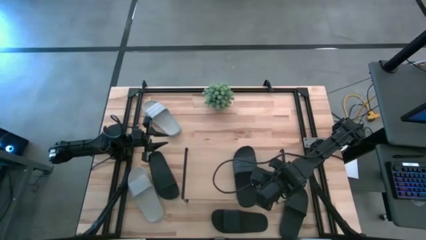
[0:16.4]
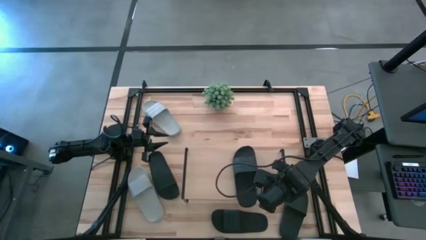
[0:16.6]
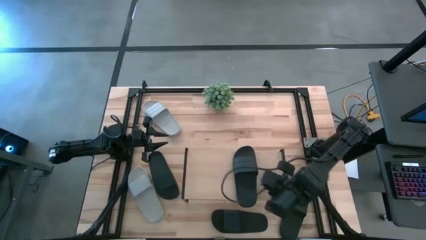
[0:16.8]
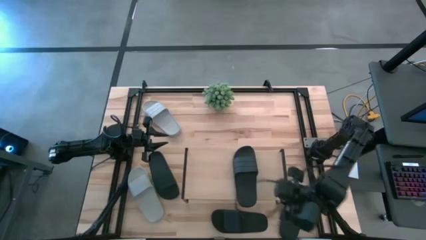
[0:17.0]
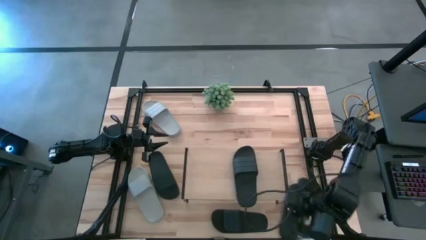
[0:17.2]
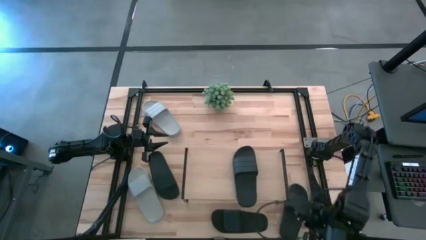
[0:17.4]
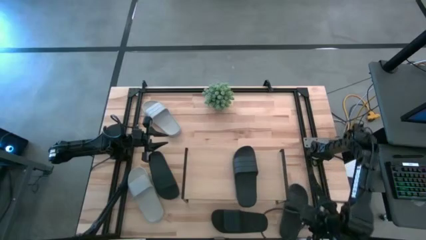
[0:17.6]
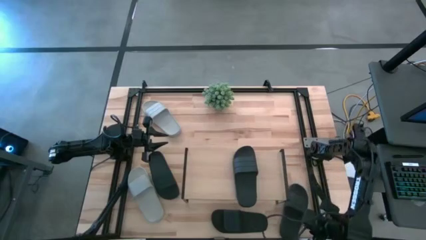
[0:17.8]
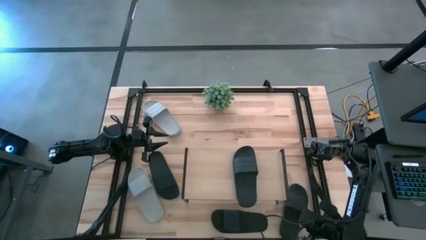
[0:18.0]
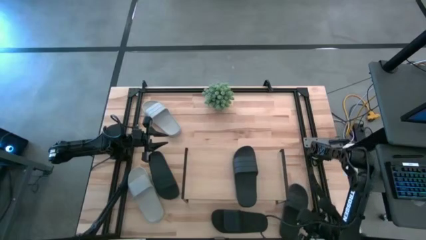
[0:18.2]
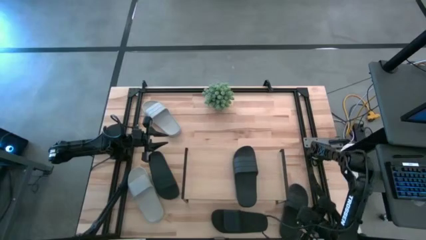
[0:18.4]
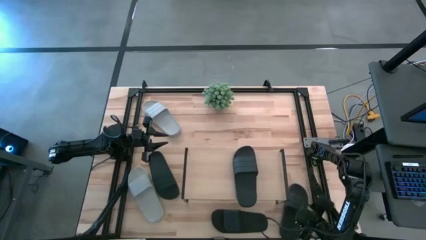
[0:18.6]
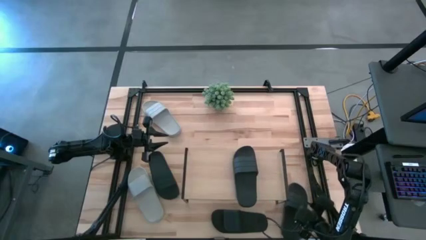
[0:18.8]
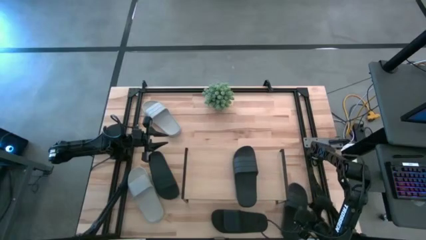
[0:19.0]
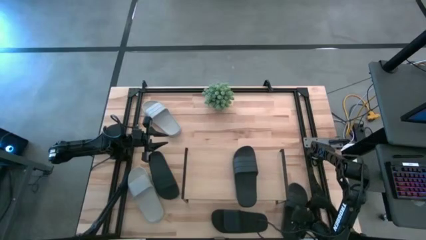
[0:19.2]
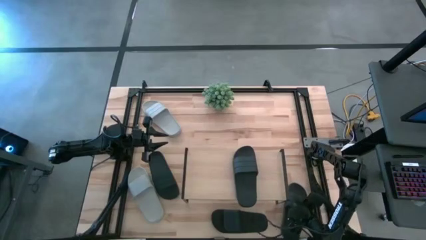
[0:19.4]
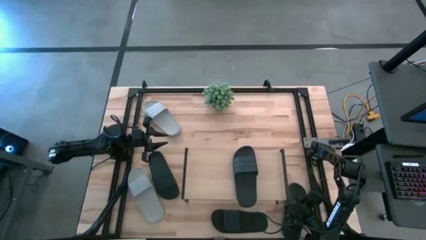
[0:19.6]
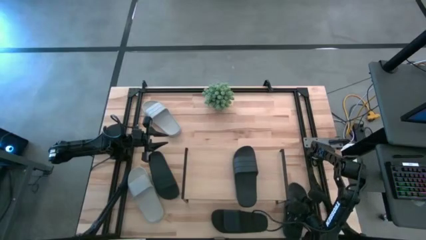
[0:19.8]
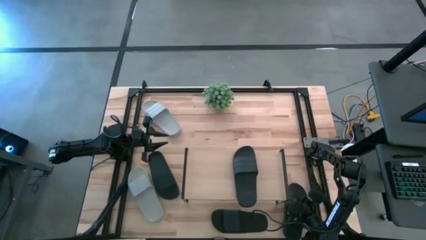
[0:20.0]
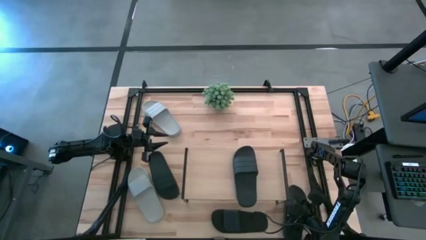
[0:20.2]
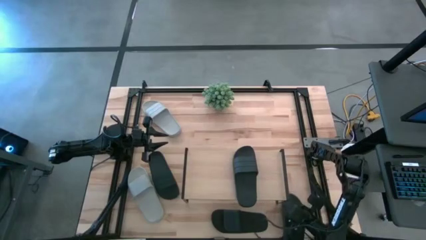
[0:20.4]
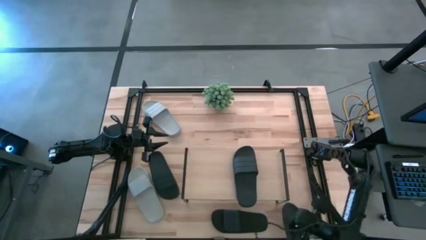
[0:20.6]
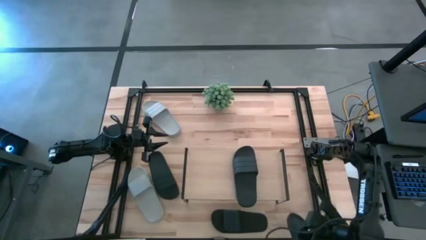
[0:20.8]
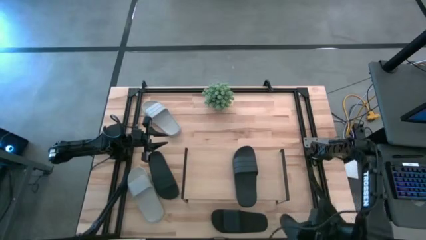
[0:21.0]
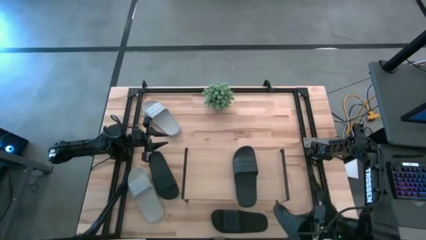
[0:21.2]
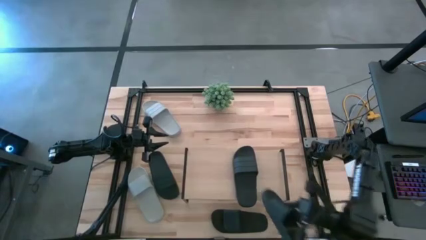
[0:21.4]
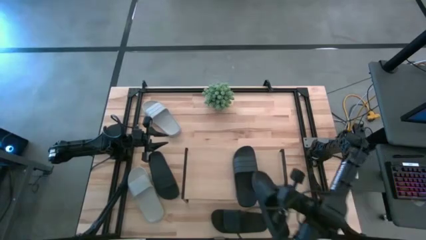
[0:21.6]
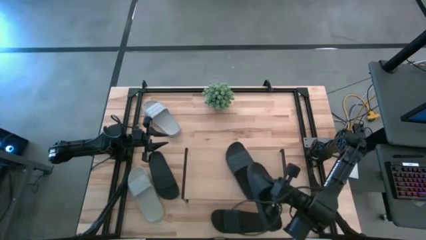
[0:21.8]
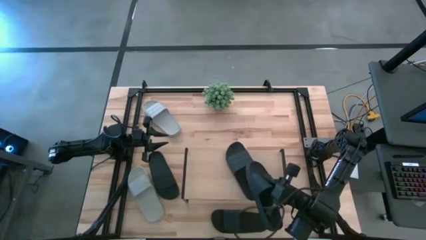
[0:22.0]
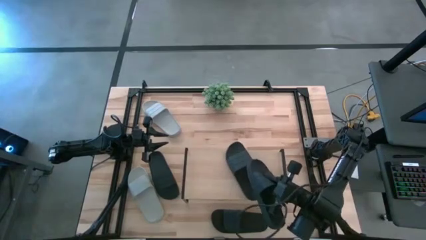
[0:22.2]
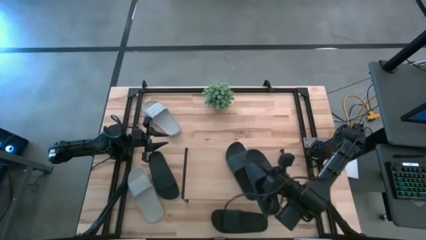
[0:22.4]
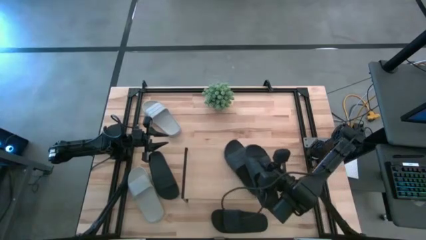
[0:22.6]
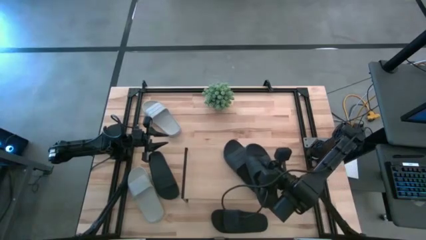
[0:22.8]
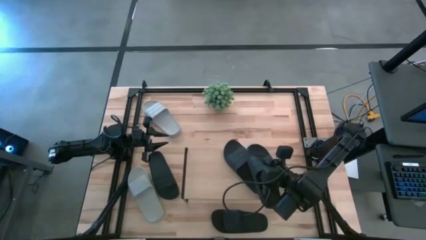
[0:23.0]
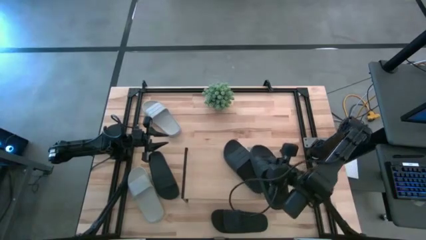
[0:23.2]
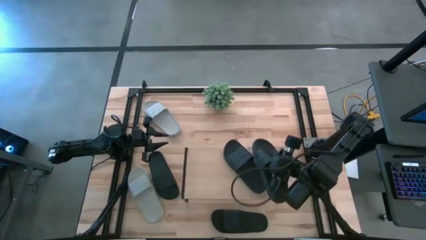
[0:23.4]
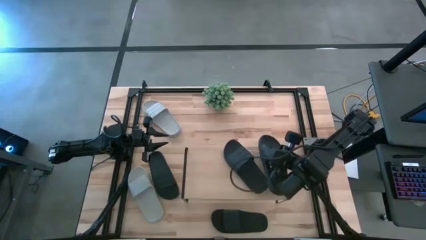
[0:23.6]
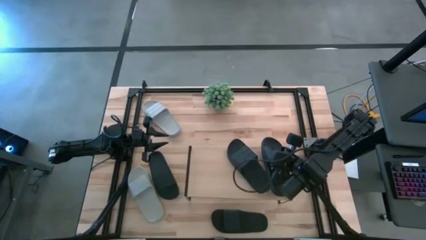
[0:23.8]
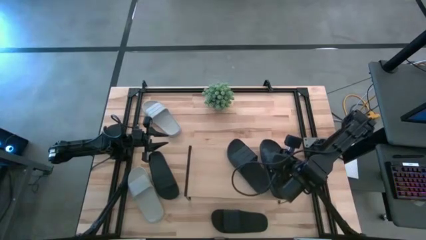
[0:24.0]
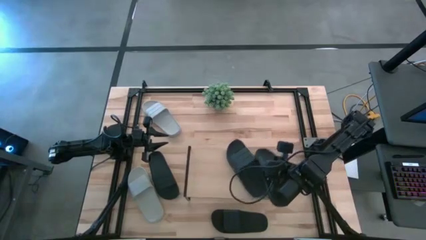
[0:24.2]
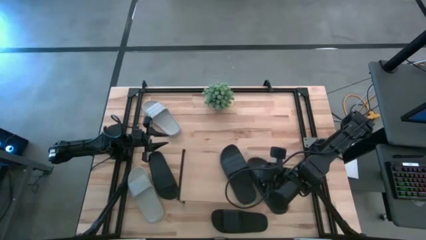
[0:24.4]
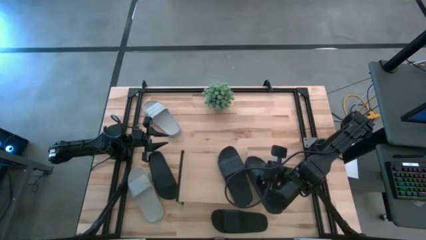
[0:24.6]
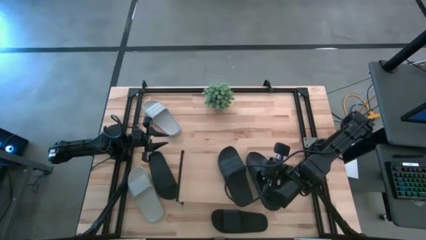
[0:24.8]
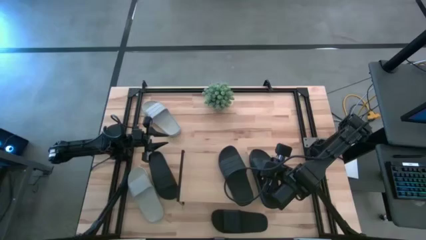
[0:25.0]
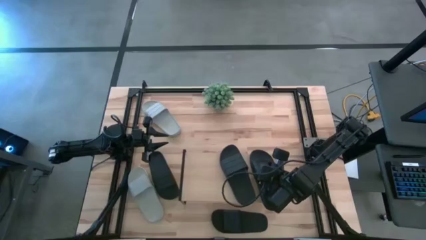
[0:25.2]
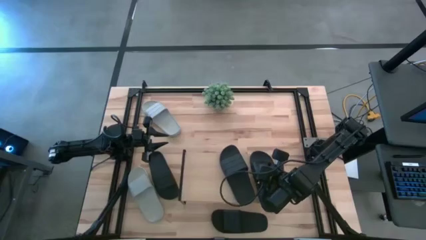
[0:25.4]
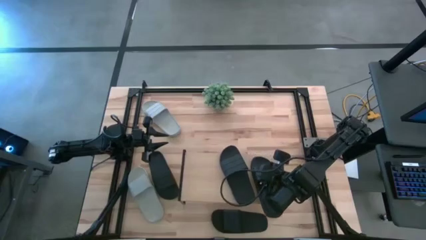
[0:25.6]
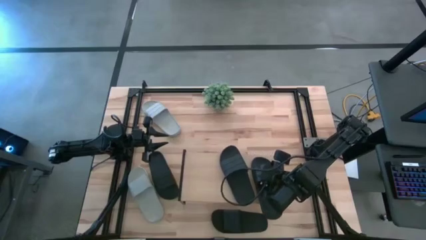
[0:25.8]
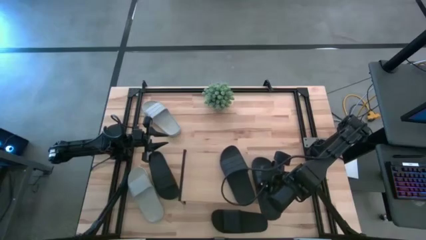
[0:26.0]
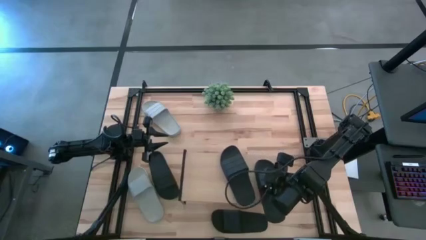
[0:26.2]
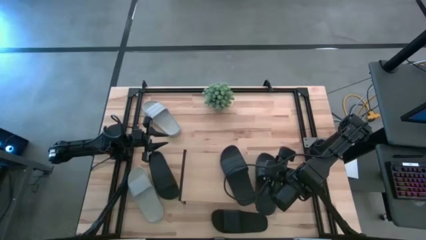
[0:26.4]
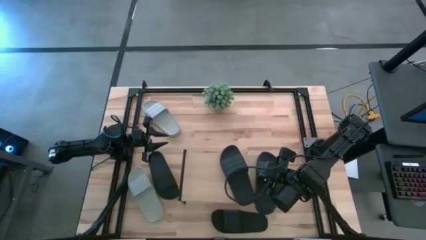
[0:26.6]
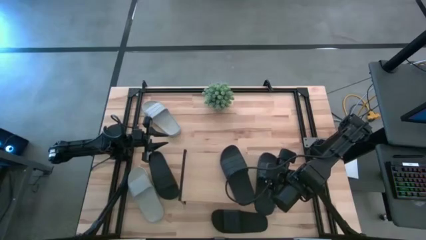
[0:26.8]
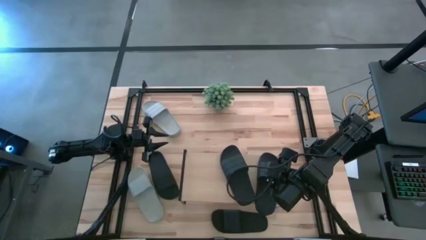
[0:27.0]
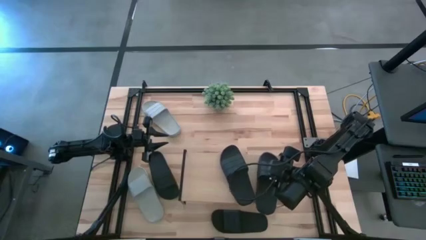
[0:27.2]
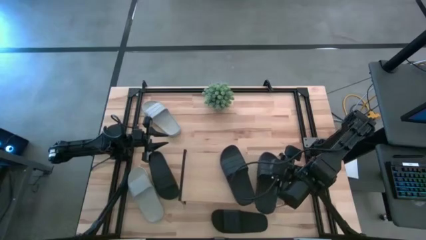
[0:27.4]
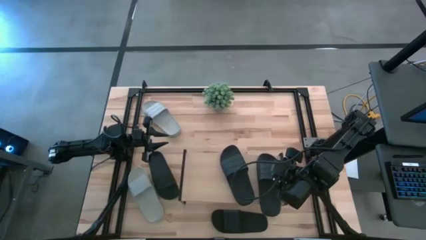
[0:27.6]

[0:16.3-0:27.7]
Task: Pick and place slides into the shelf
Put the black slipper on the shelf

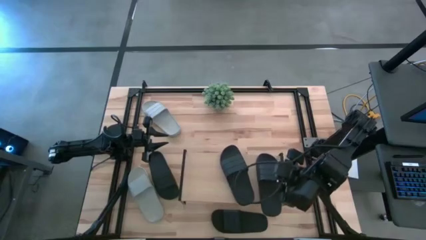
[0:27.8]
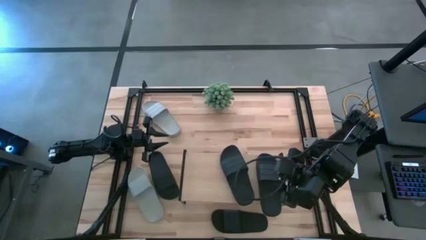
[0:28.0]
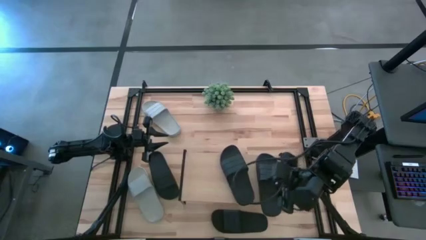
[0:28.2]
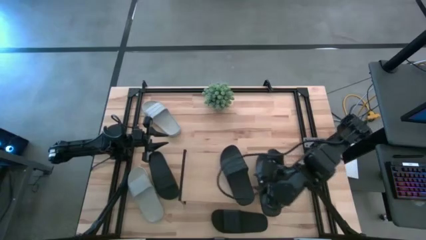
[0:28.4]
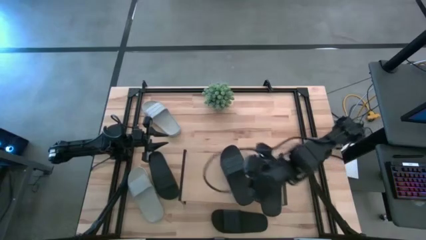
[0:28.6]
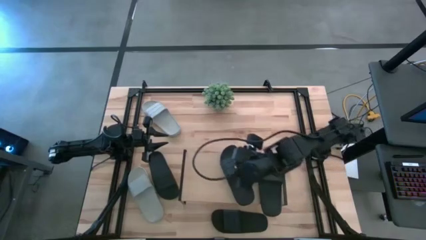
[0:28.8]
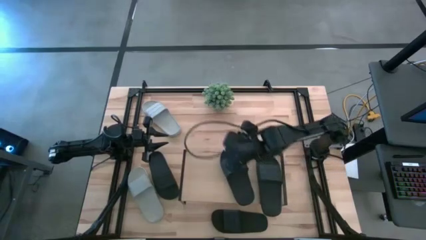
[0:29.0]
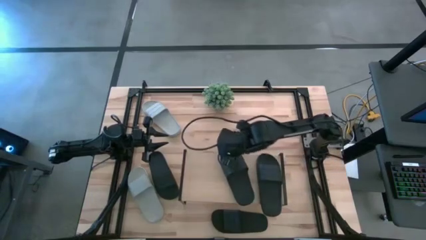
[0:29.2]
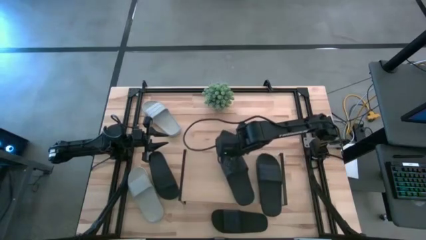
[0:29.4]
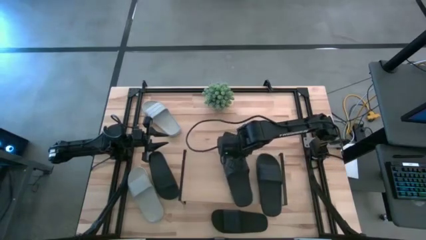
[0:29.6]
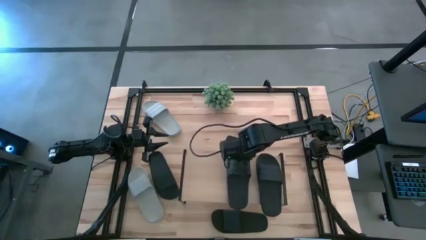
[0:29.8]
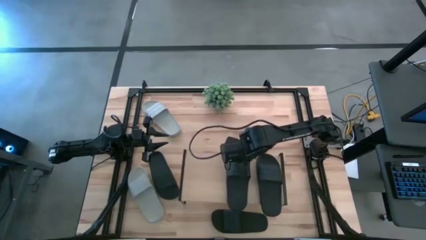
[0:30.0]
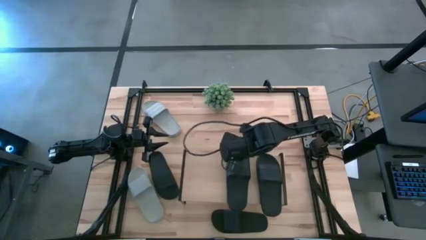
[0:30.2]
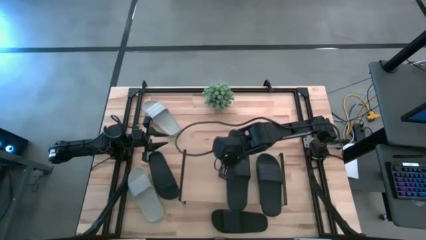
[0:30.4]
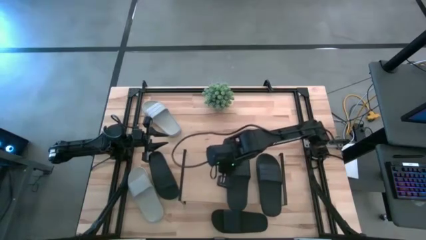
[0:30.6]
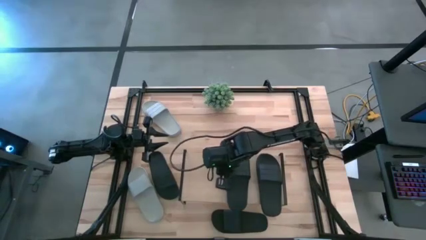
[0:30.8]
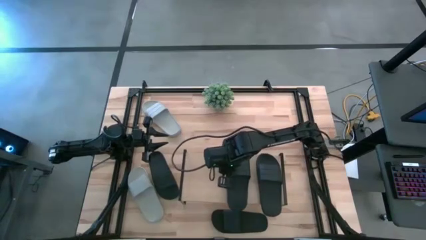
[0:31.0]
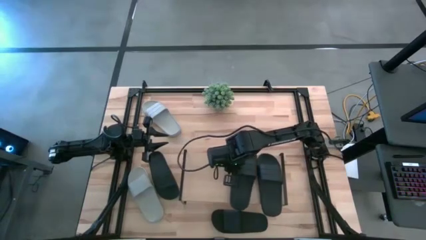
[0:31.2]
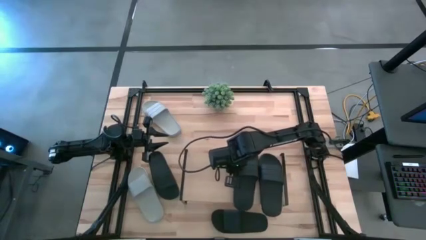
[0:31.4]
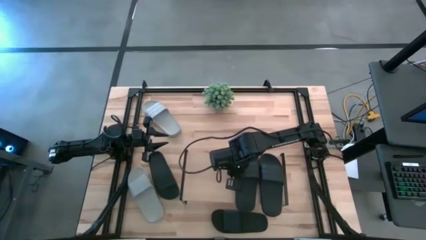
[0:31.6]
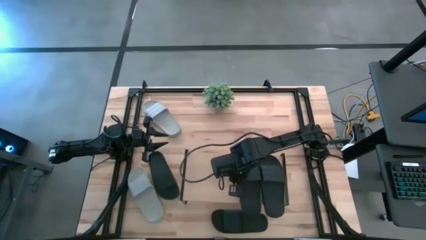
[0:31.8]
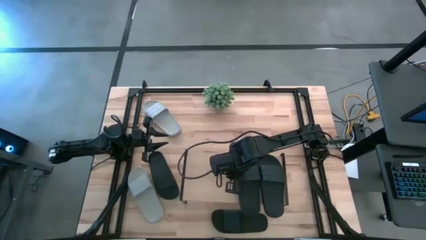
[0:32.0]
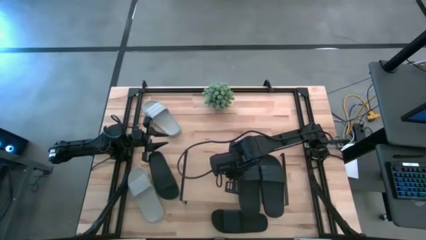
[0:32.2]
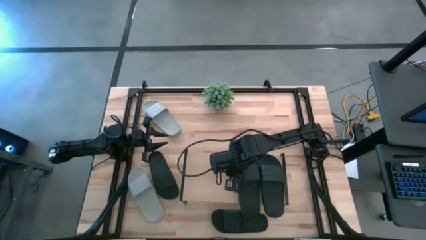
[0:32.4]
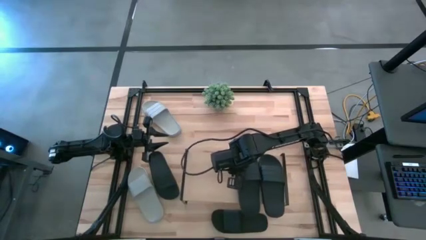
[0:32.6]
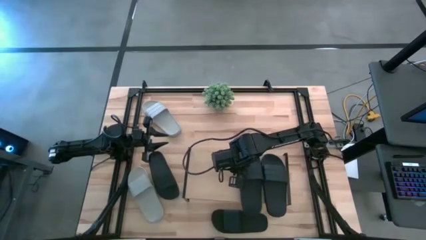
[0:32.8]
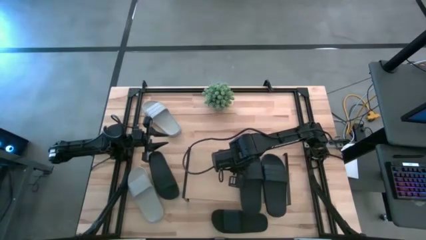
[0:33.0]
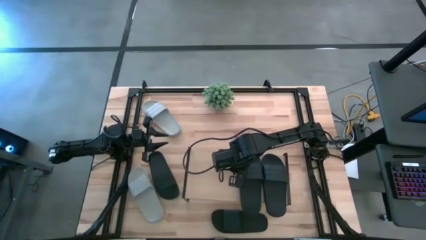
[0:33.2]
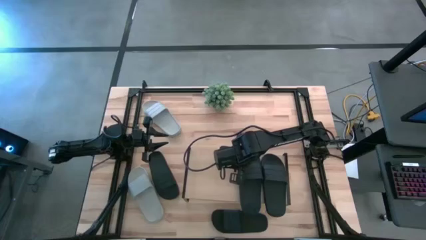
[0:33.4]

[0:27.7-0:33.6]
Adjust the black slipper on the shelf
